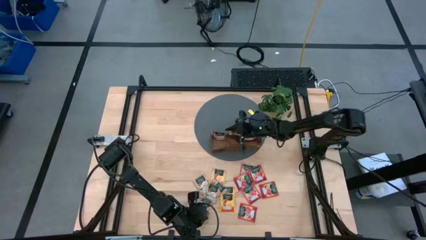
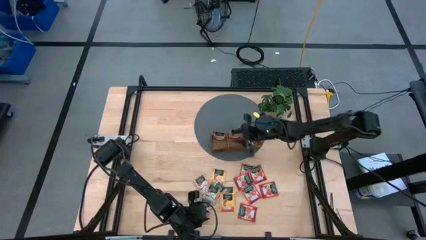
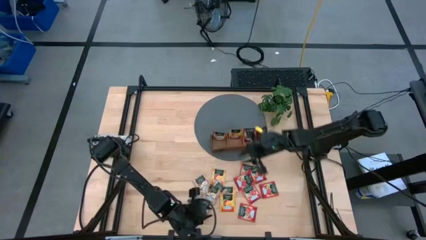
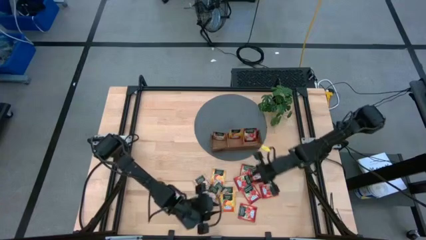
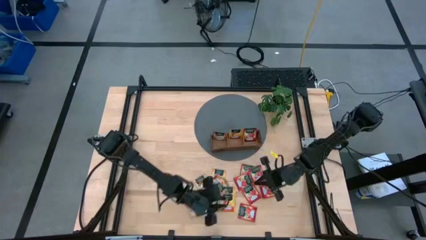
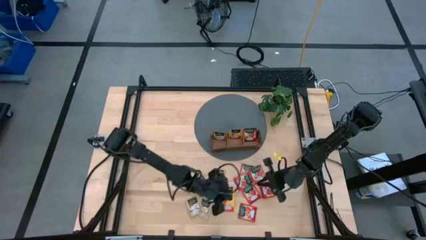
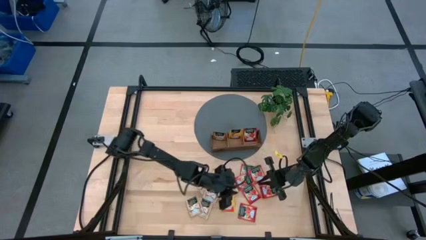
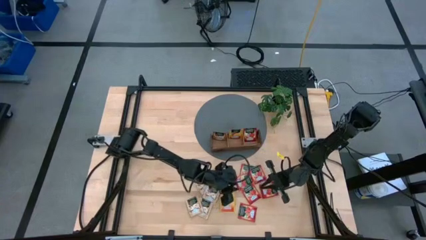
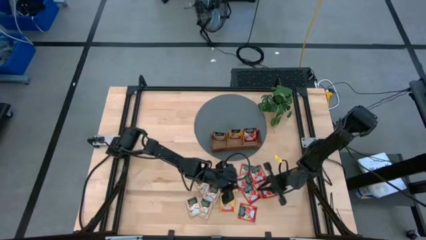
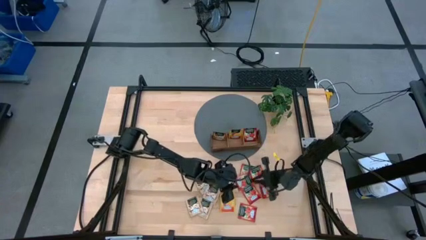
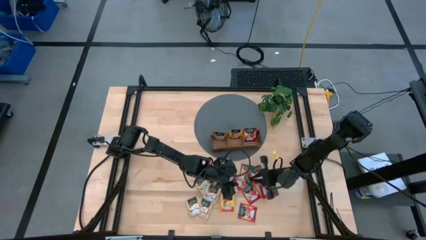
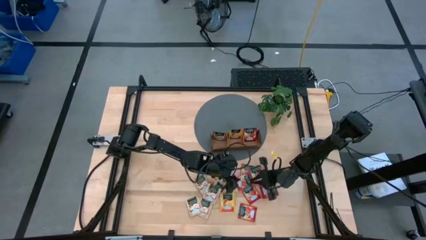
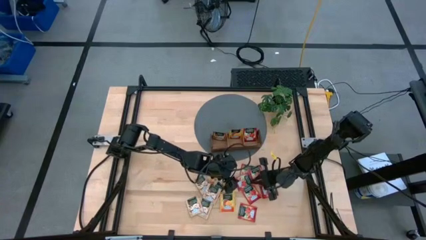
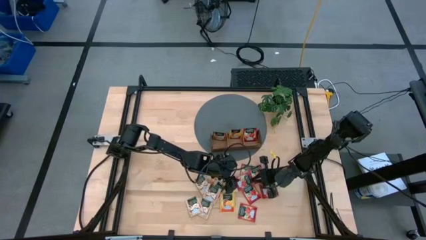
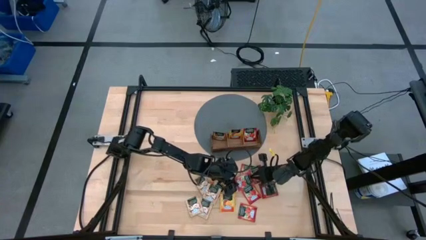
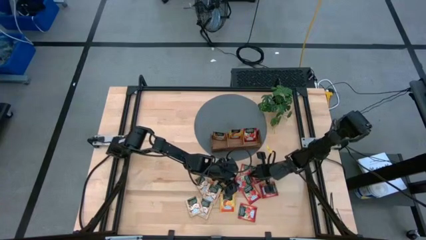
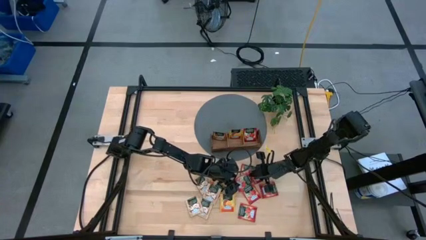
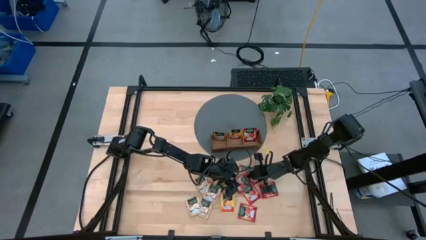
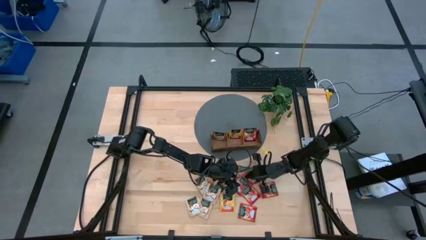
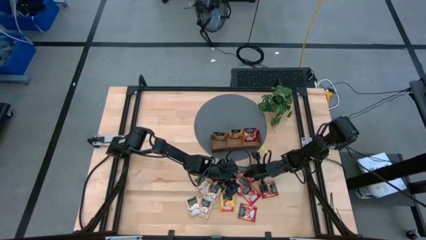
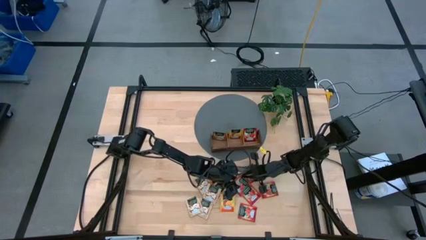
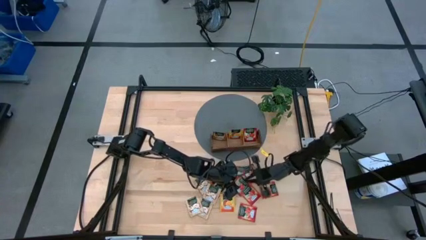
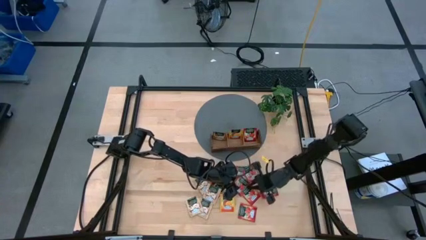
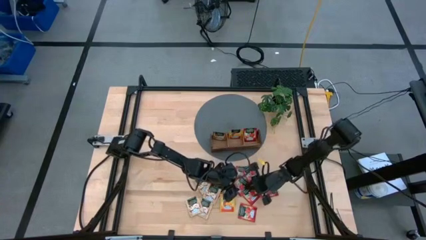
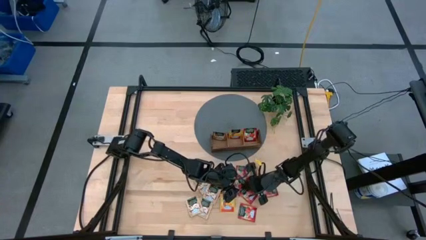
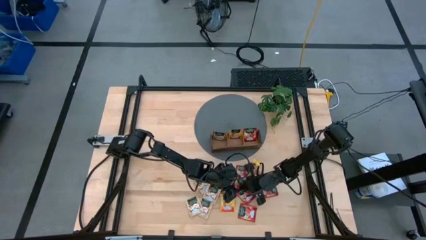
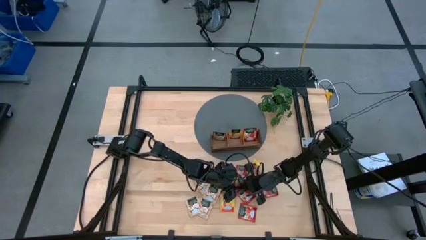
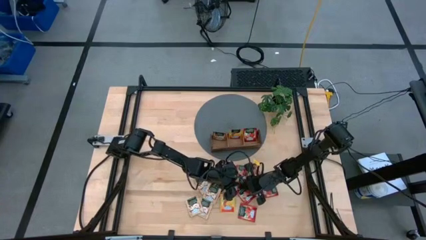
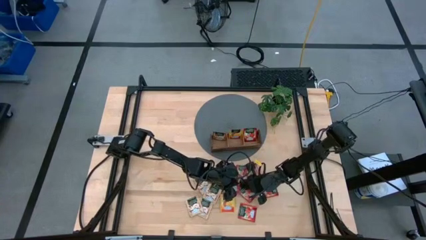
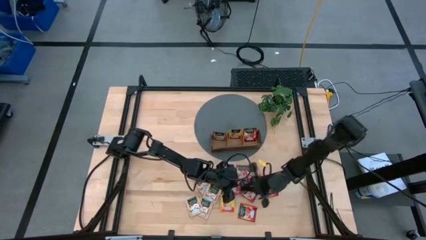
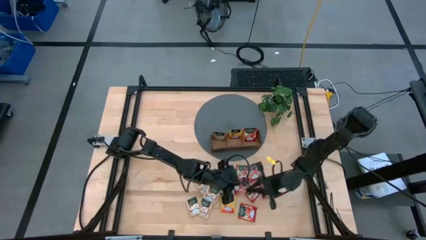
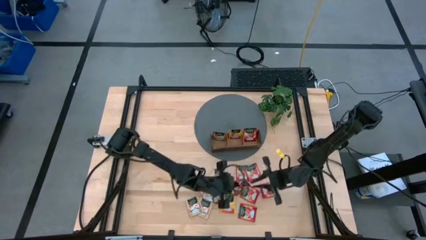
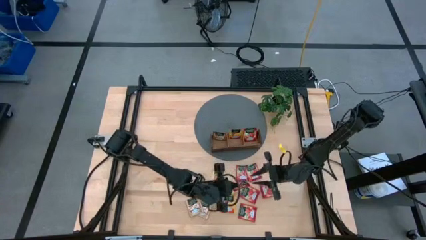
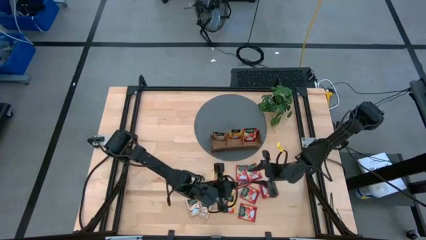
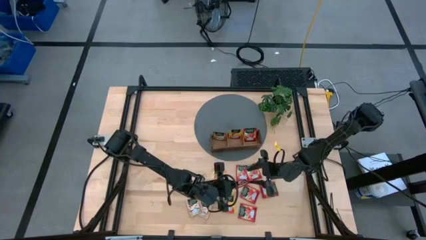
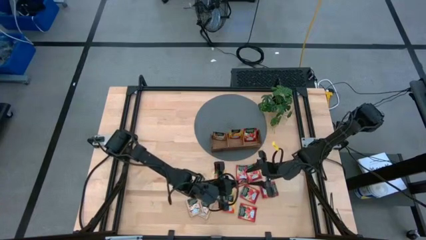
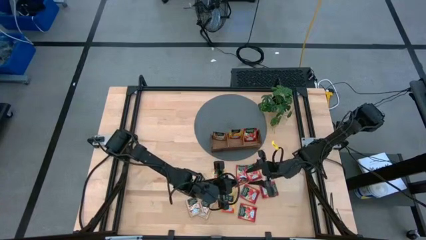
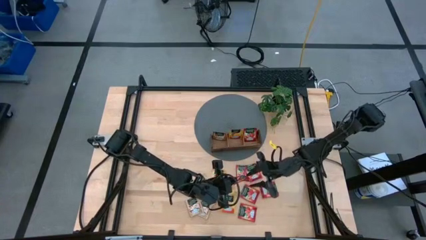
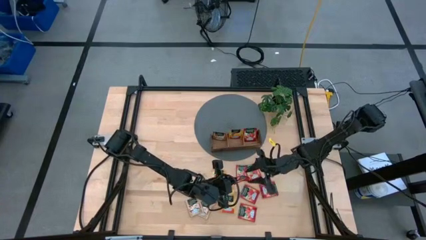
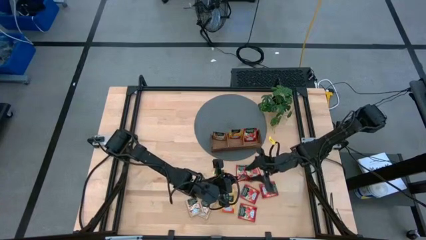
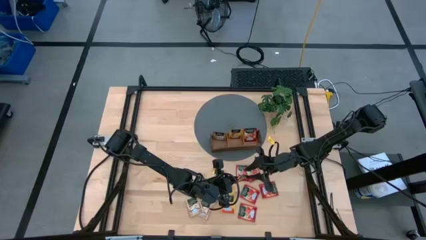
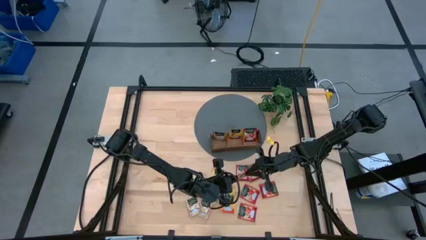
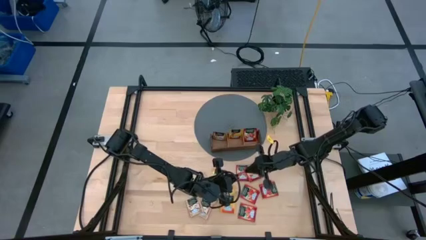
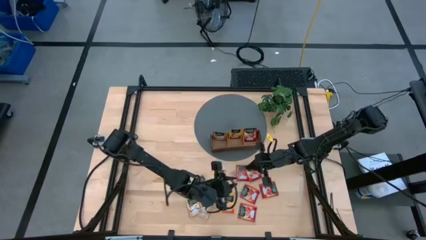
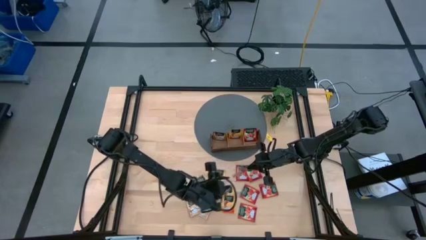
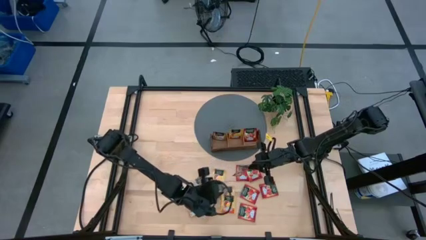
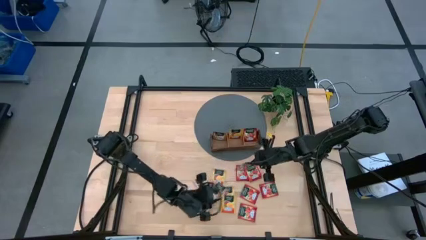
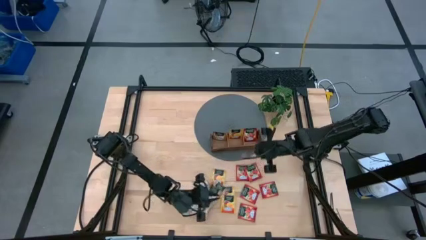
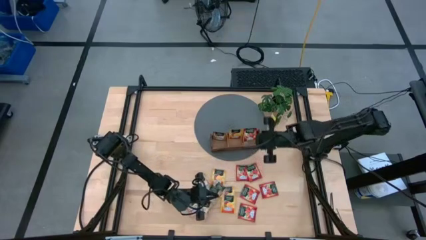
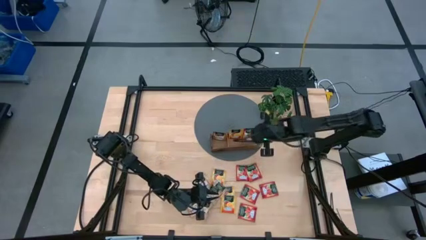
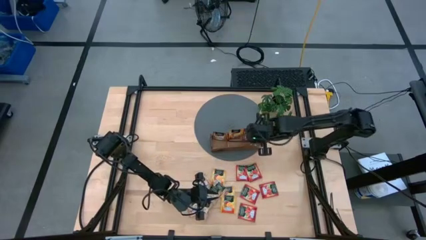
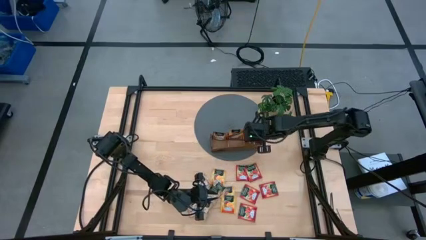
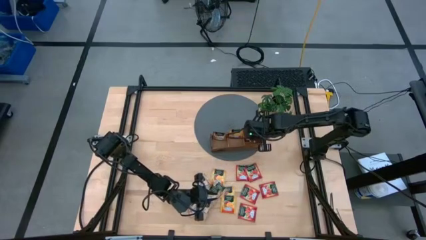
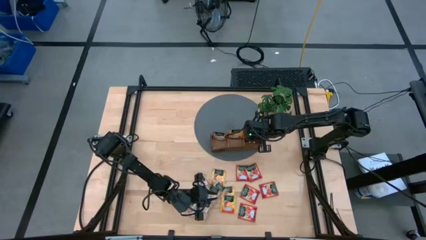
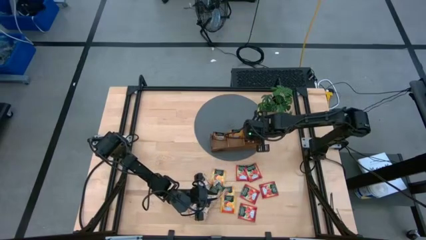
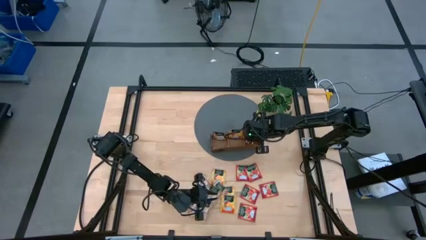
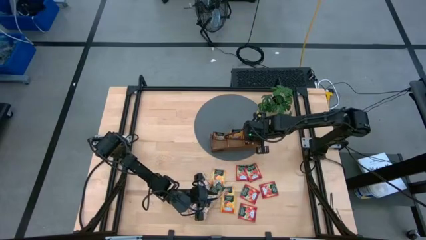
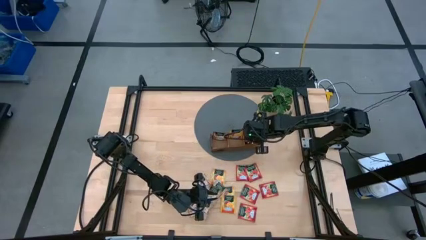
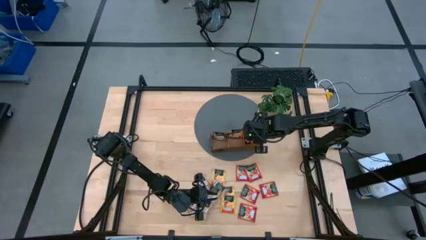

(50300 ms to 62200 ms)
Task: Pick & Place Tea
Put the red tea bag into the right section of the wooden organizer

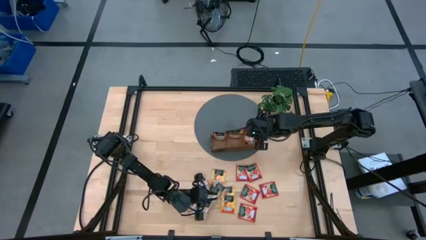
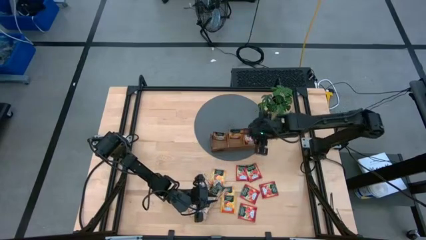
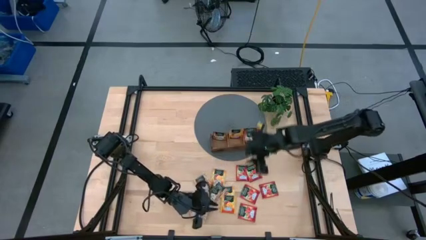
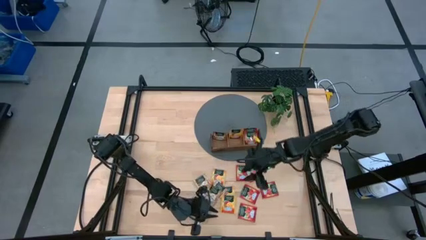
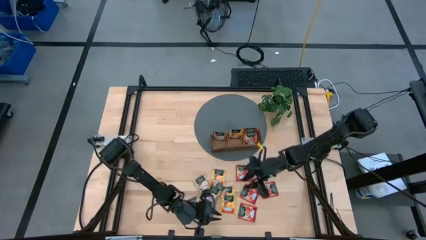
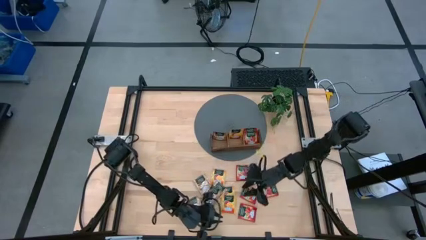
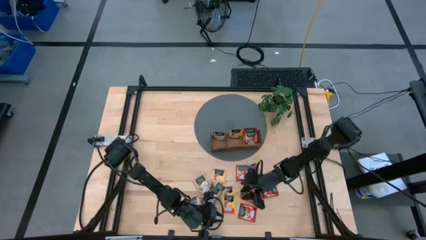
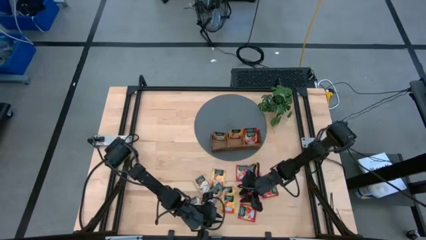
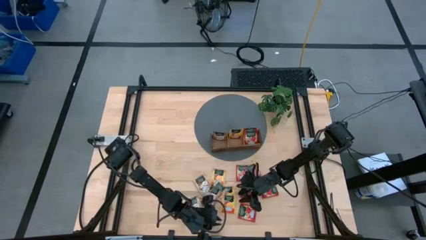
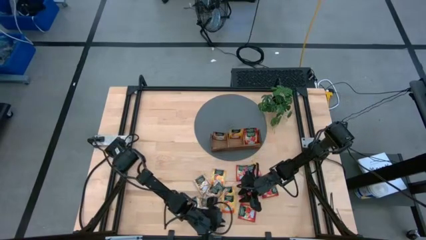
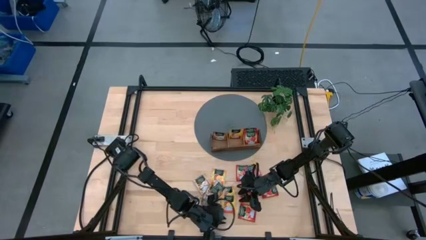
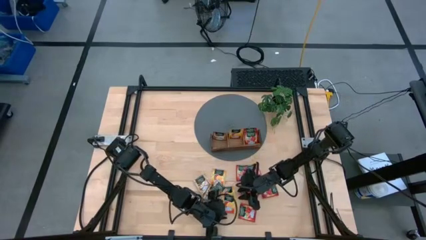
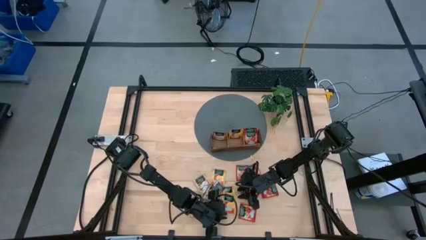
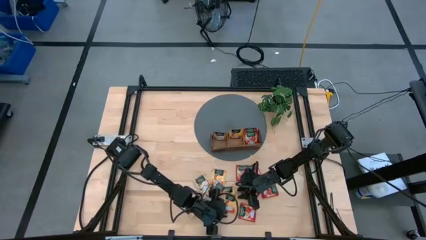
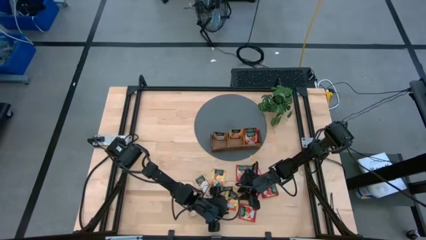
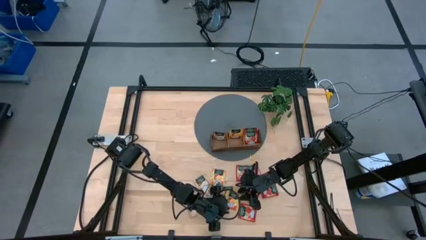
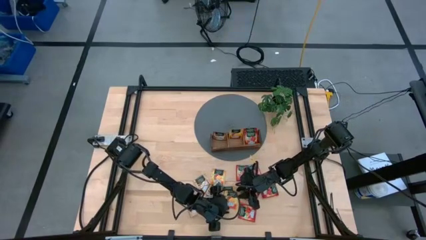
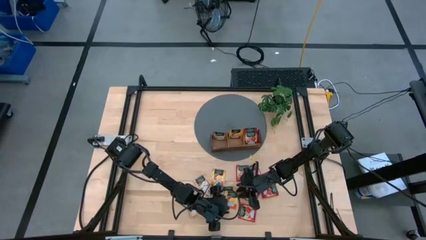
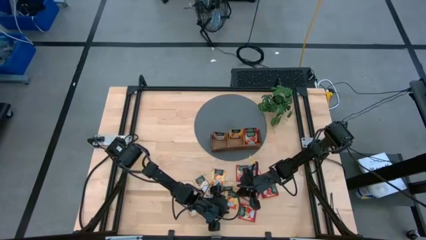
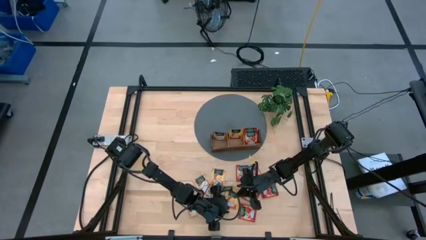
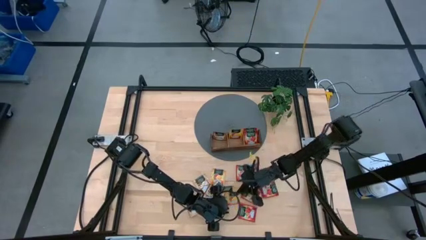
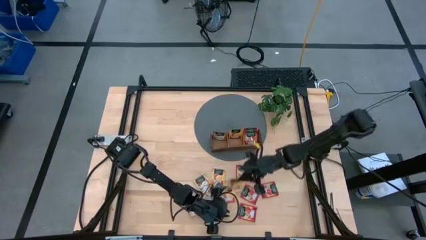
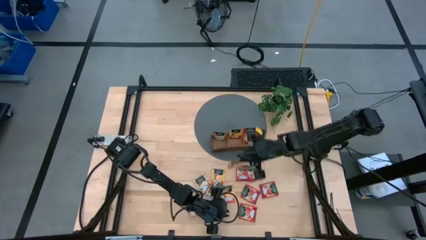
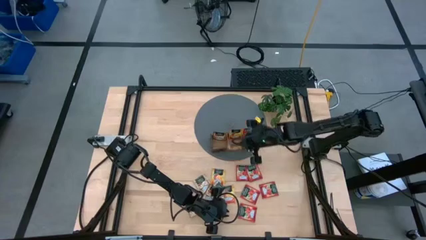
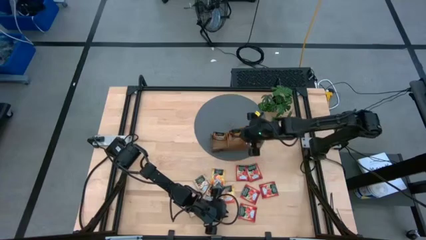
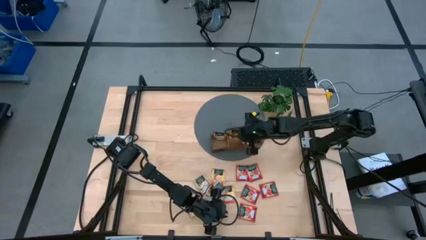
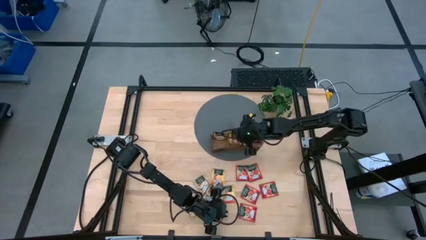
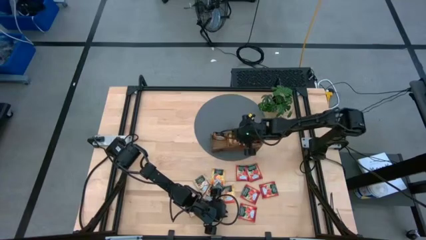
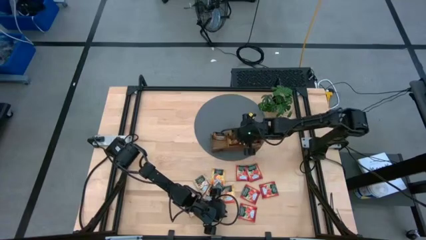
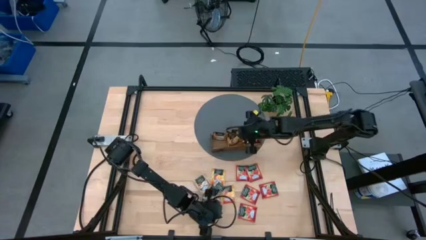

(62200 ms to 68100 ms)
Put the orange tea bag into the middle section of the wooden organizer
